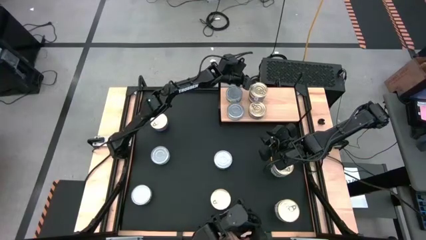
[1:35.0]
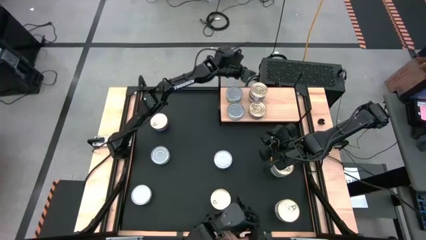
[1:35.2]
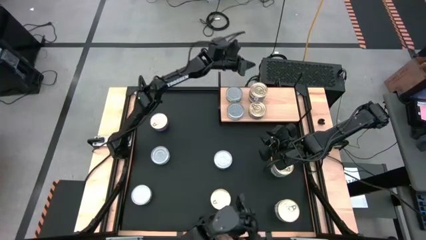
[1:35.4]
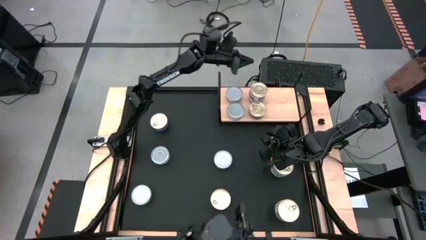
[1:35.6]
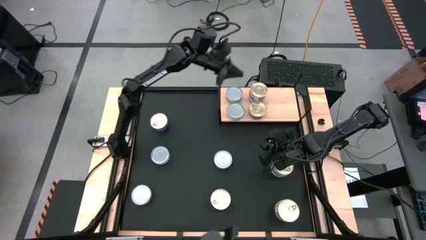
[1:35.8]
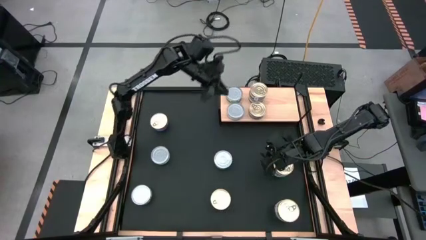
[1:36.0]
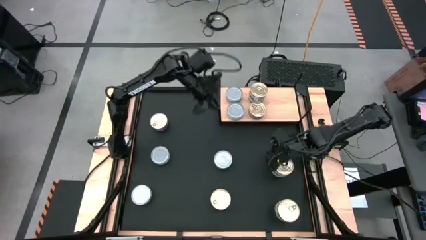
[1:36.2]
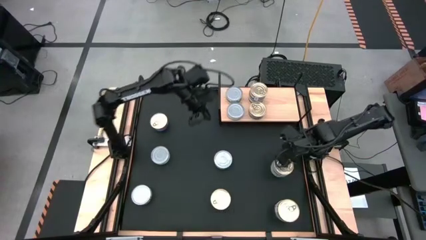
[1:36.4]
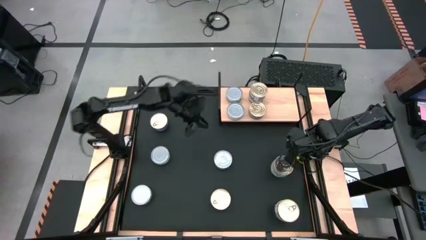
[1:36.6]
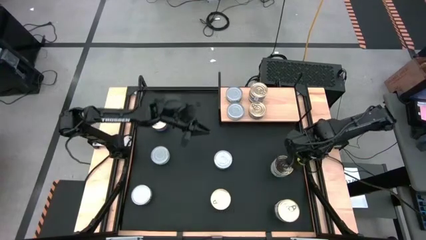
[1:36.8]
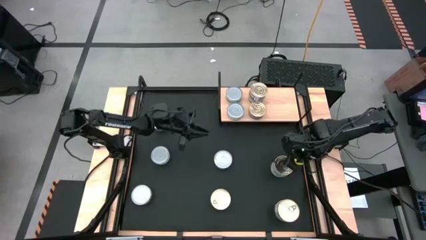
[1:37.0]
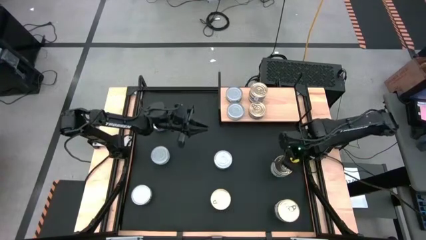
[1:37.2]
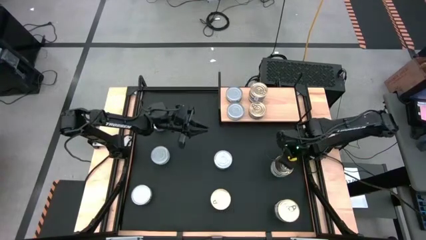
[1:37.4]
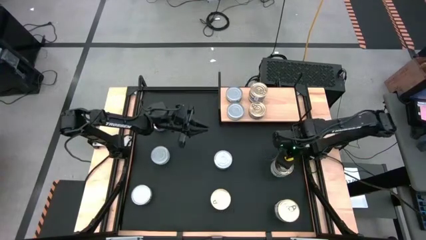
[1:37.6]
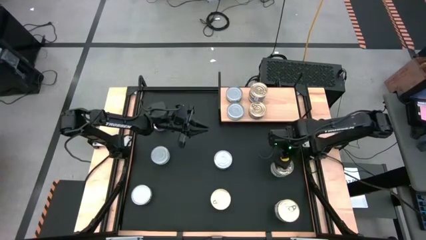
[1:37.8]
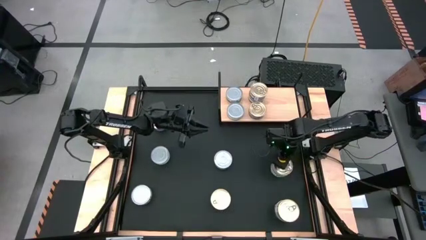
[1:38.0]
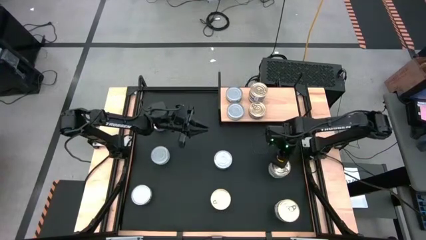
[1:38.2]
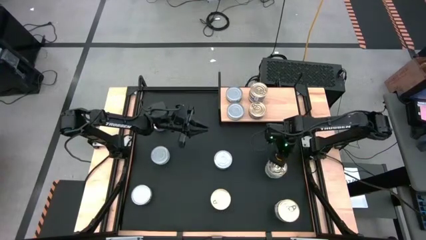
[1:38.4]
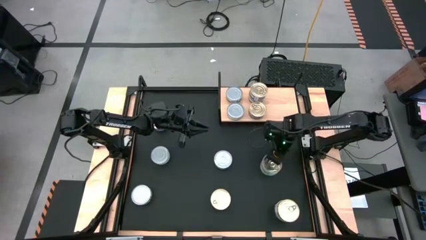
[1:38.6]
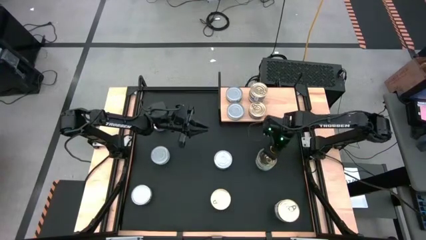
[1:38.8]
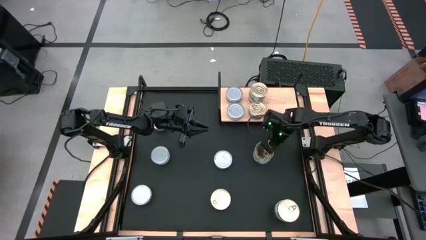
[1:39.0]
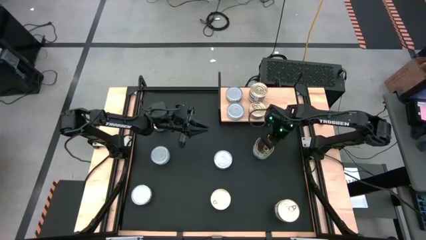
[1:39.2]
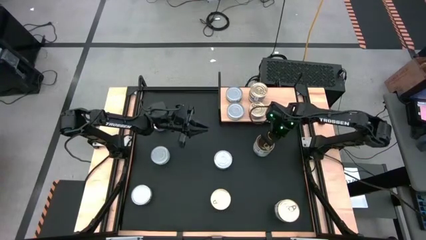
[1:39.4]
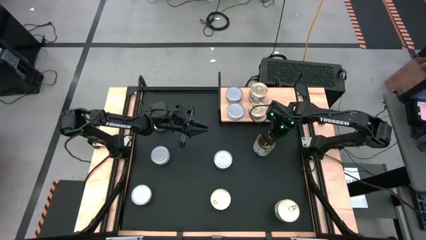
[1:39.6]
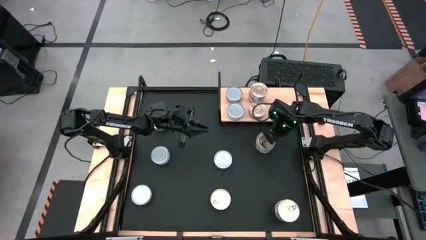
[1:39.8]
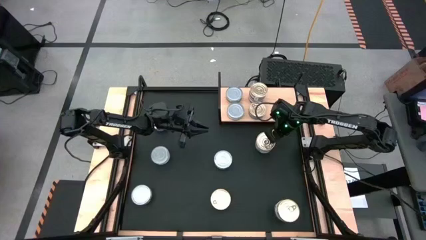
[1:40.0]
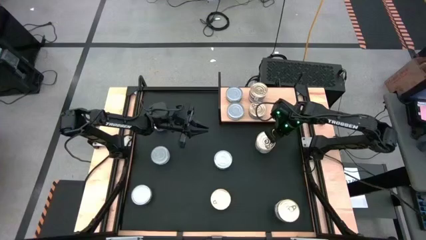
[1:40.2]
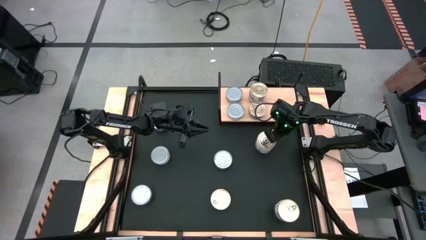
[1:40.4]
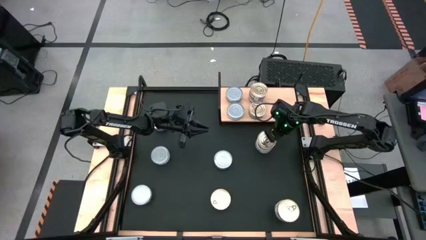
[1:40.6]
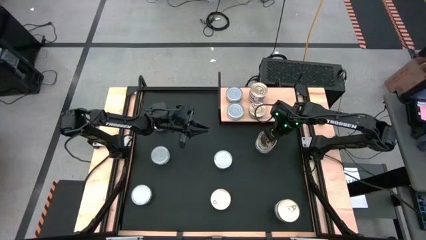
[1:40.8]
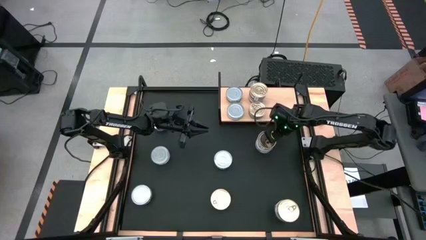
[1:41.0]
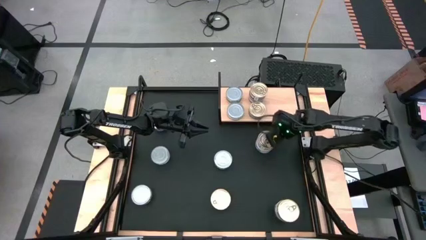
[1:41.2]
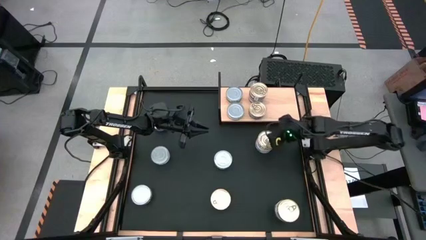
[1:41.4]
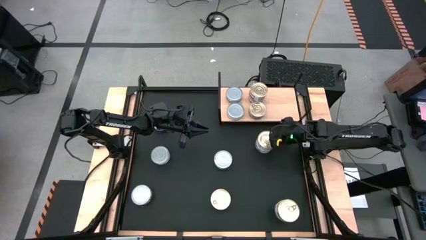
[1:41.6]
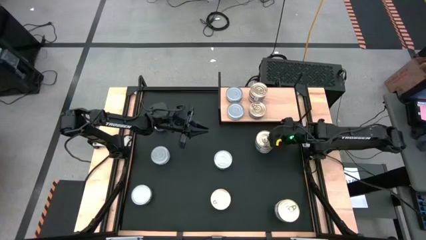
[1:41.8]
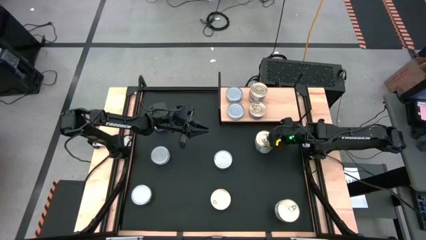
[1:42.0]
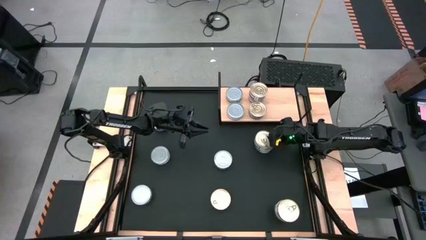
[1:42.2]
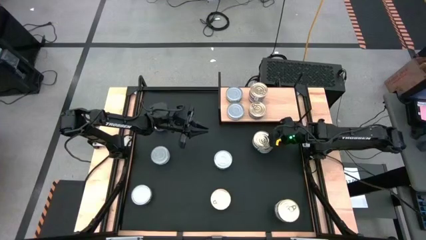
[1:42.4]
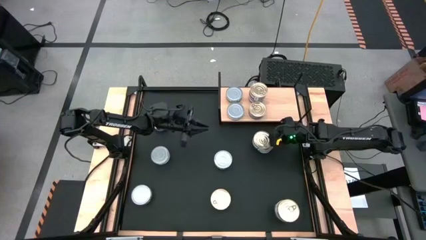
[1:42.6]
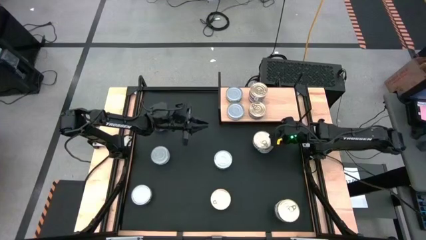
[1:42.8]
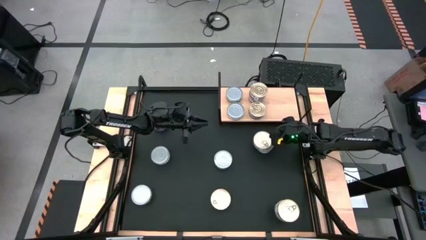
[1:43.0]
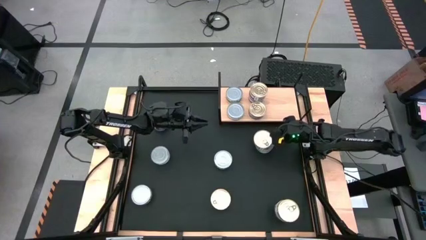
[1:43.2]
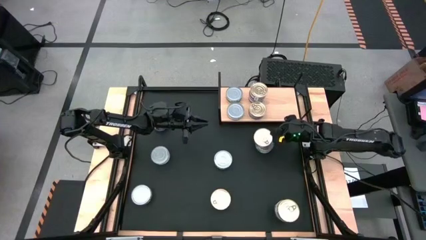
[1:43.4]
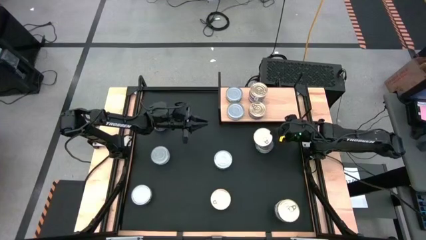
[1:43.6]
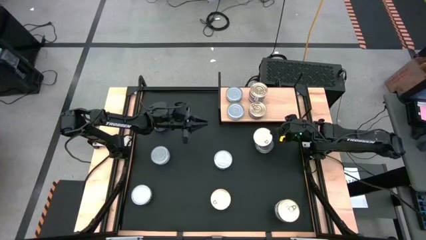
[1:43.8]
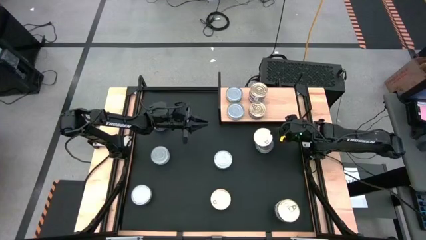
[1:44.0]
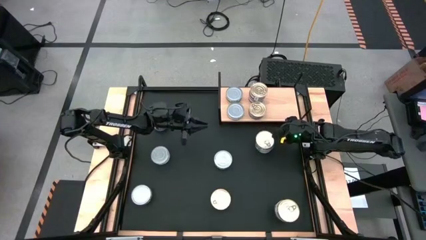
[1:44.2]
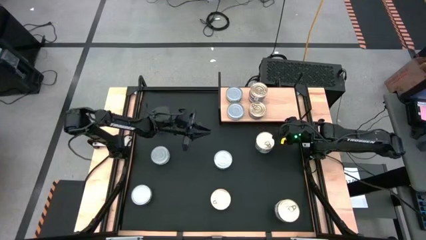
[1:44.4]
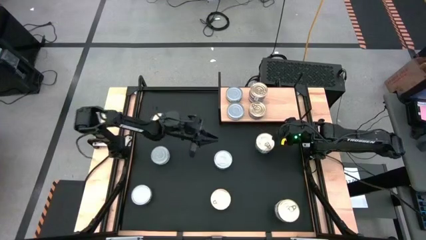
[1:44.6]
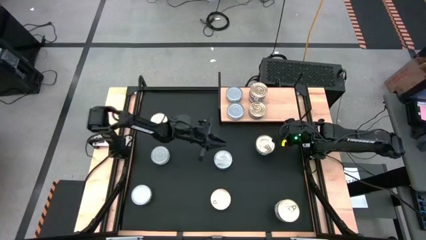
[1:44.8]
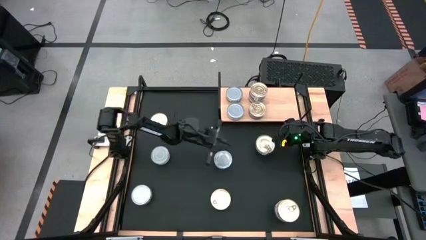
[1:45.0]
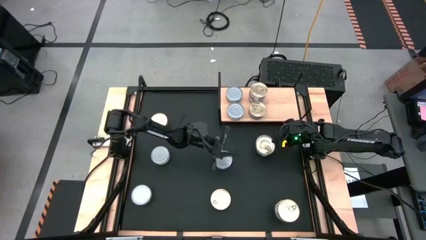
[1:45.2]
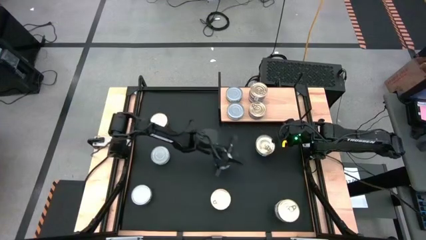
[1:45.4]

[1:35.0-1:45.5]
Task: Stack canned seafood by type on shelf
Put the blue pink tuna can on the shelf

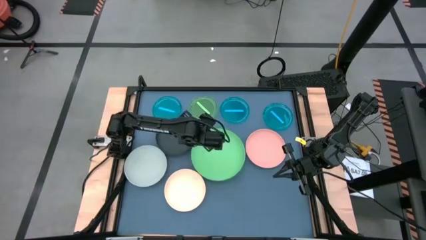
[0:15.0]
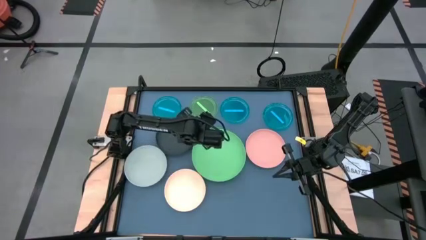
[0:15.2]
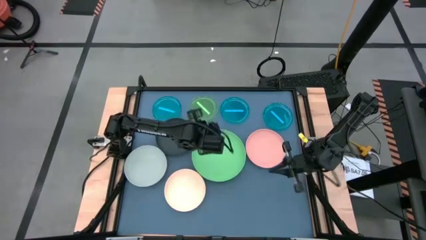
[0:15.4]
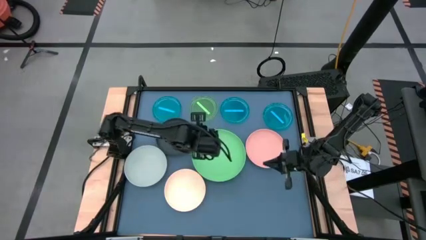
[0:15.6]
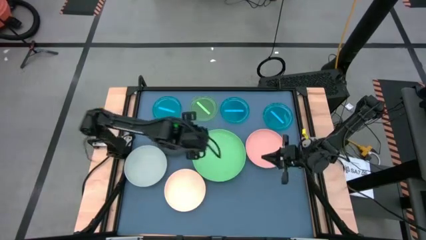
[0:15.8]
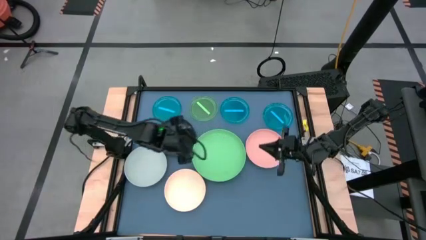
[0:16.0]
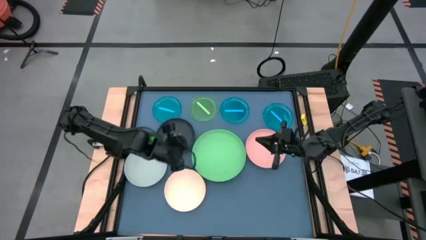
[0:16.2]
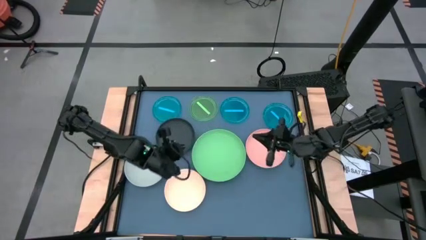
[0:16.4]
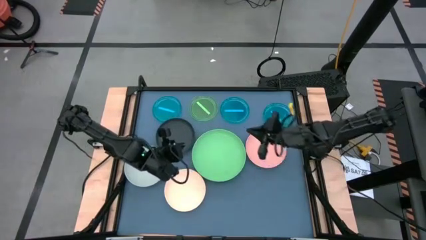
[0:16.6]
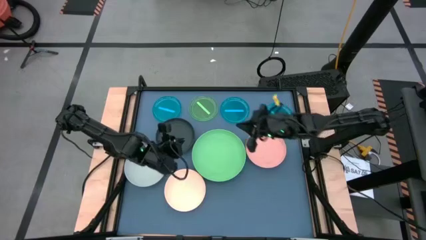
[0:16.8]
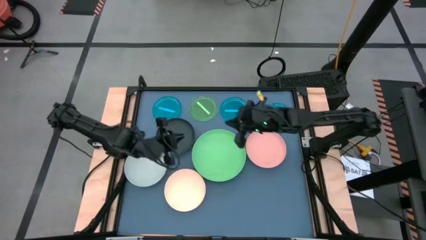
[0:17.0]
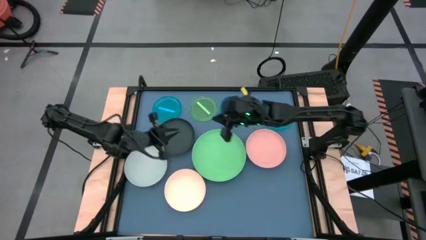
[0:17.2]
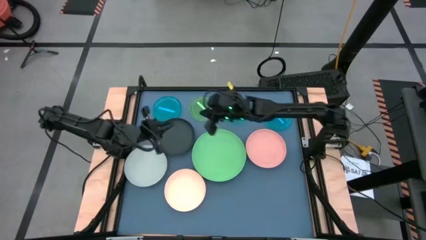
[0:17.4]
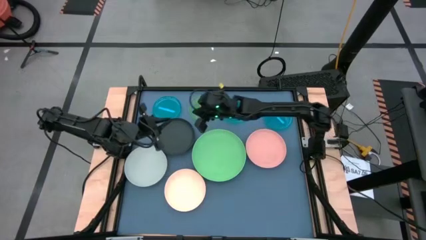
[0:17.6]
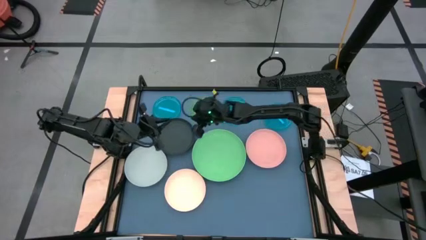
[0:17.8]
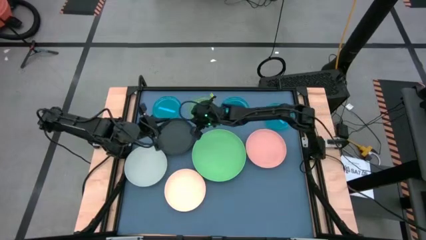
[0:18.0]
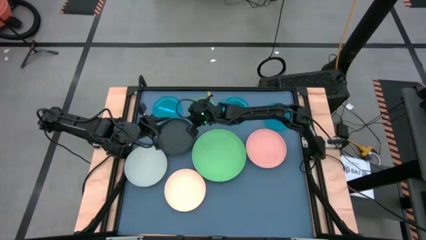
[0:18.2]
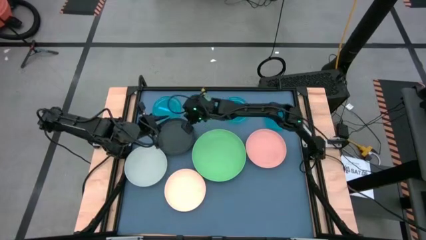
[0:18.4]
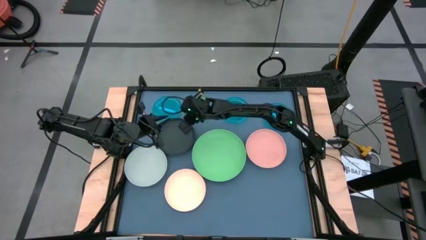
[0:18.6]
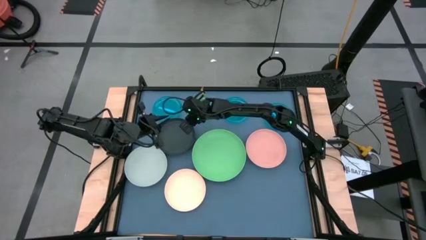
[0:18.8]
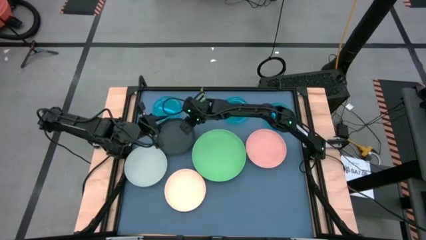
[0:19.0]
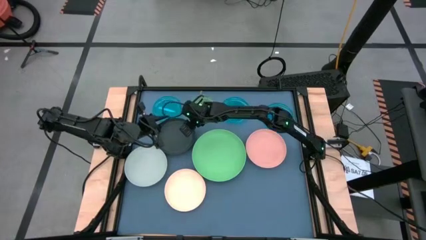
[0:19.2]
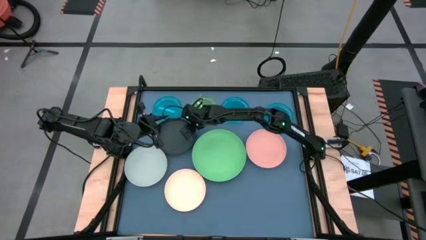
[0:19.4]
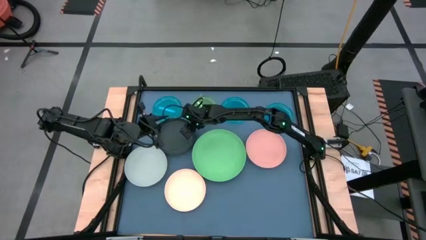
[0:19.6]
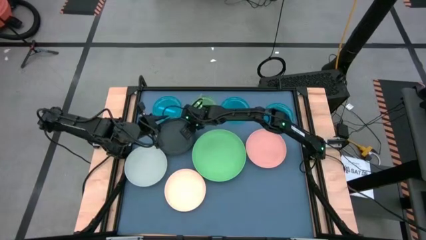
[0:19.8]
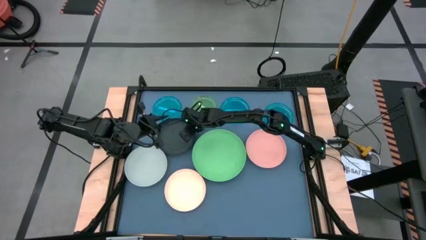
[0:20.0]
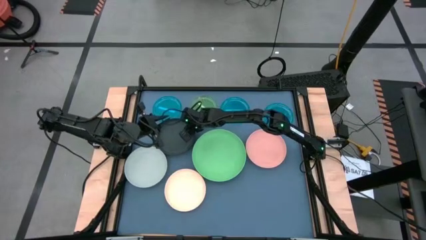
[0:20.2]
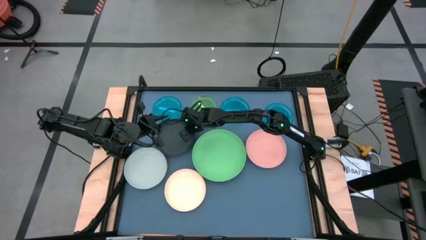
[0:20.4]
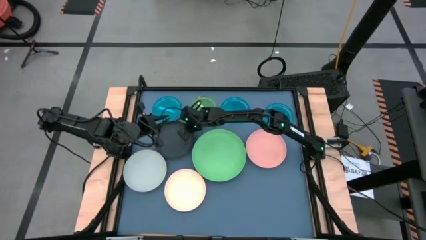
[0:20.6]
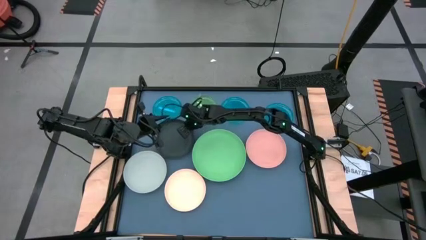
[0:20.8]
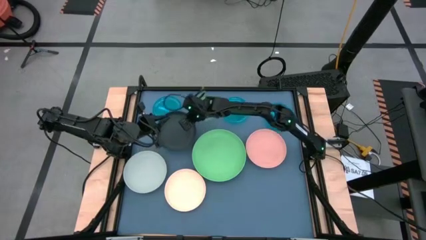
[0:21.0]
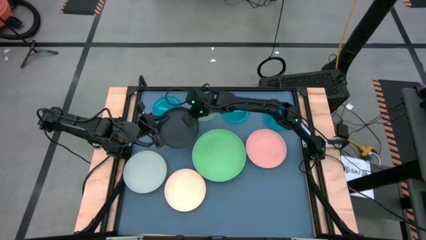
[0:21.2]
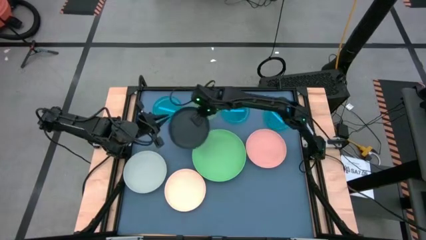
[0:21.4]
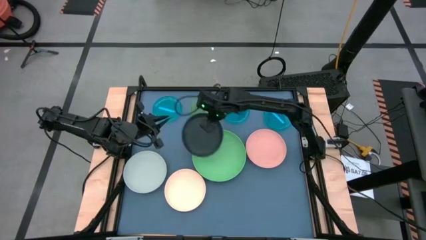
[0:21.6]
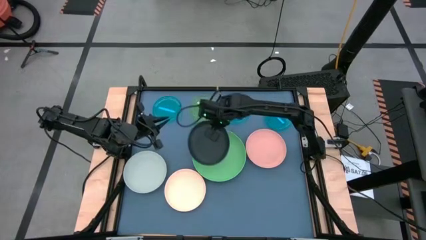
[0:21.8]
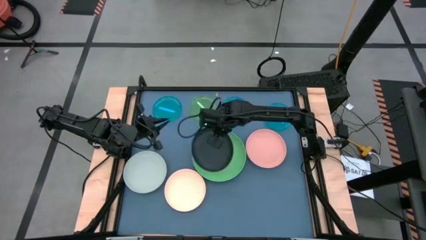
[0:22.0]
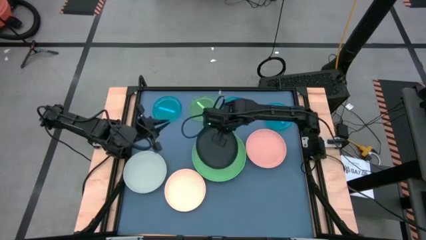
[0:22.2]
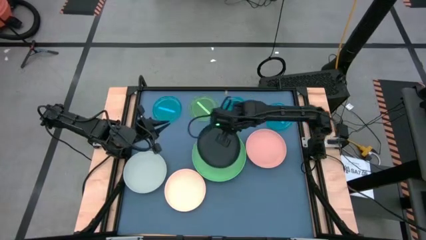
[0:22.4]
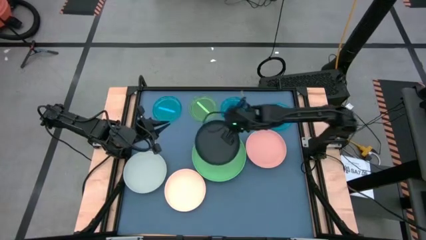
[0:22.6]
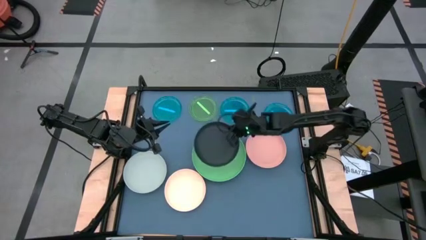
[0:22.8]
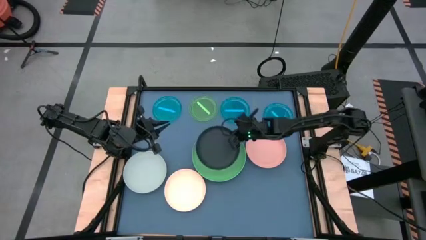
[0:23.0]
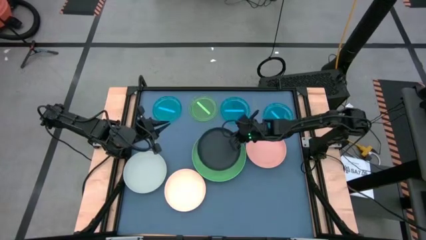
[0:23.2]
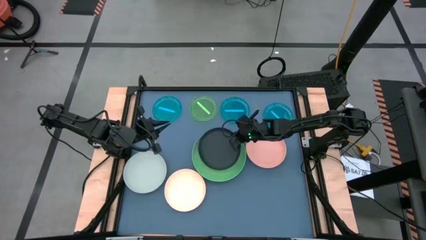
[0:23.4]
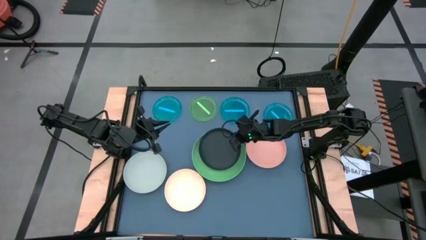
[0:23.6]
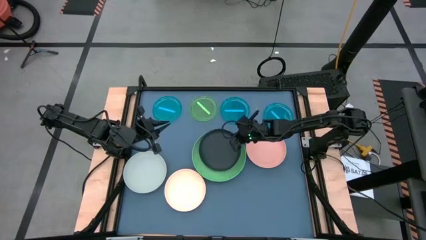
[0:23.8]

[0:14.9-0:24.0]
Task: Stack plastic plates
Stack the black plate on the light green plate
